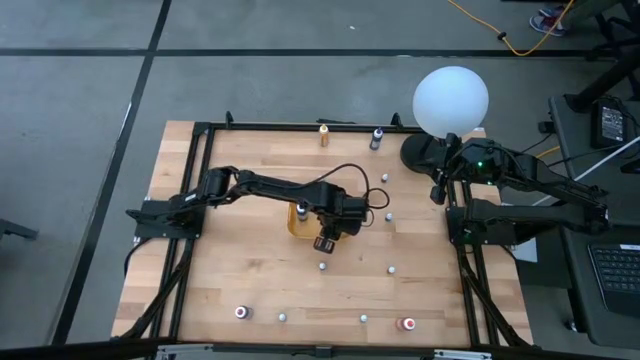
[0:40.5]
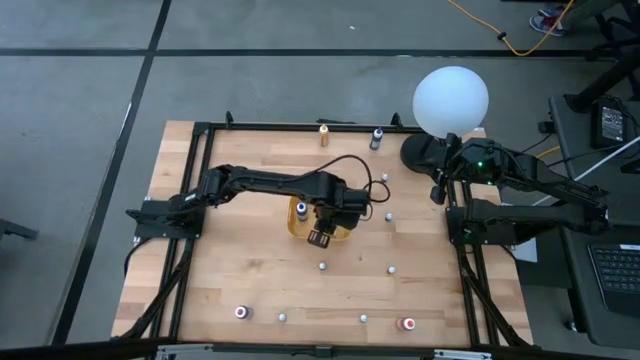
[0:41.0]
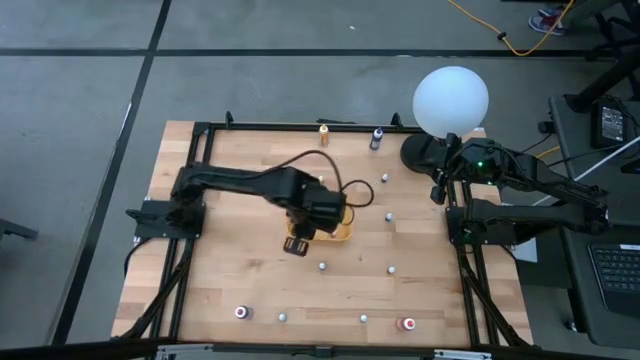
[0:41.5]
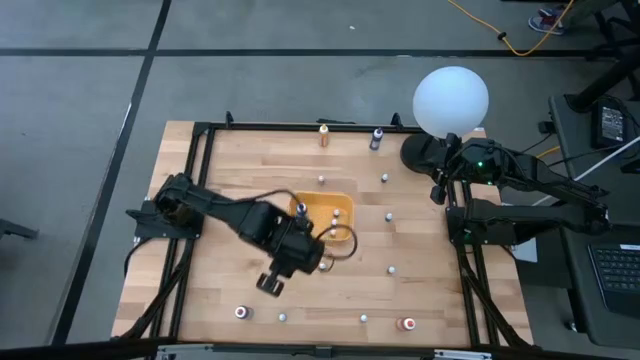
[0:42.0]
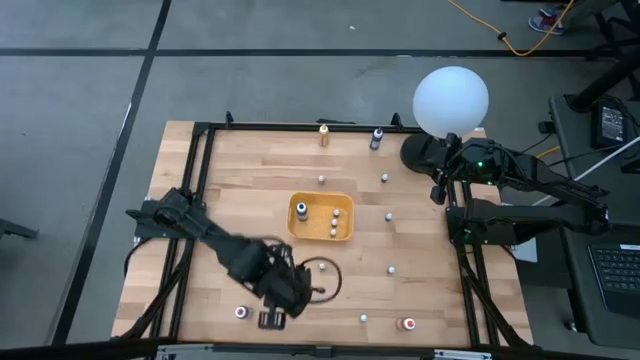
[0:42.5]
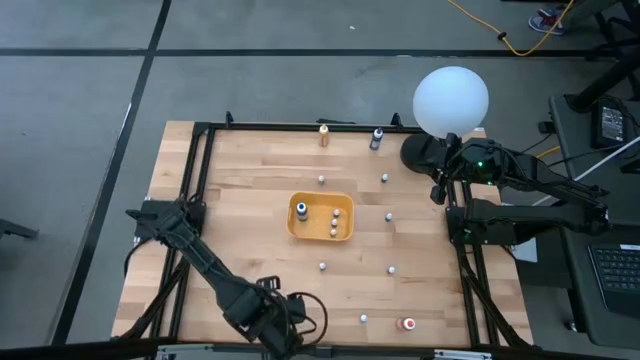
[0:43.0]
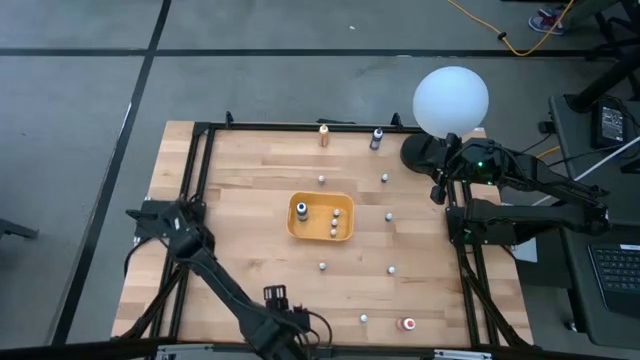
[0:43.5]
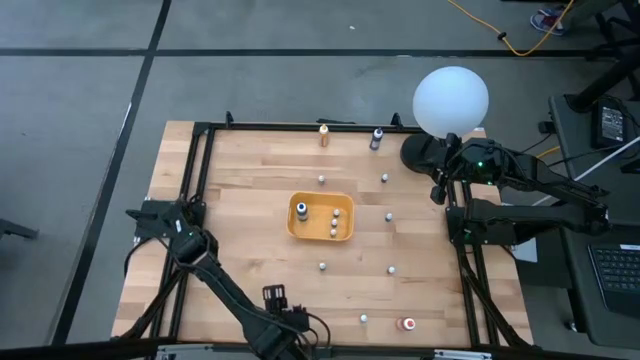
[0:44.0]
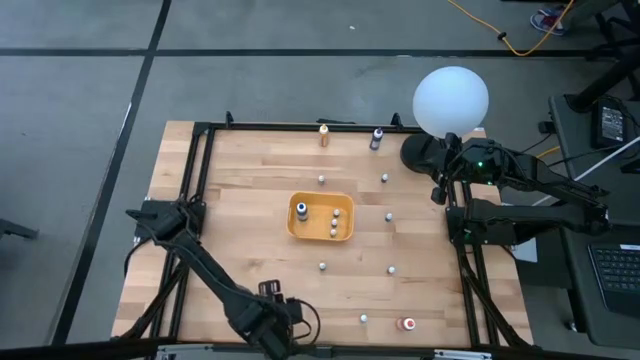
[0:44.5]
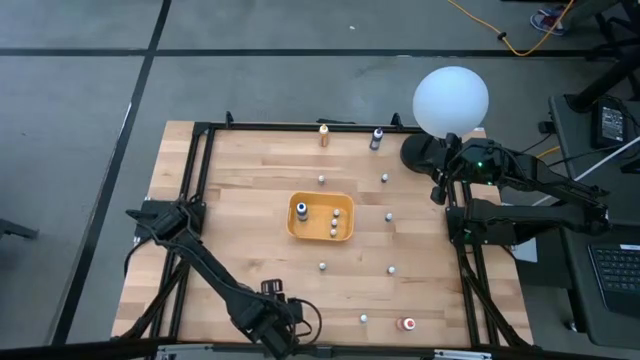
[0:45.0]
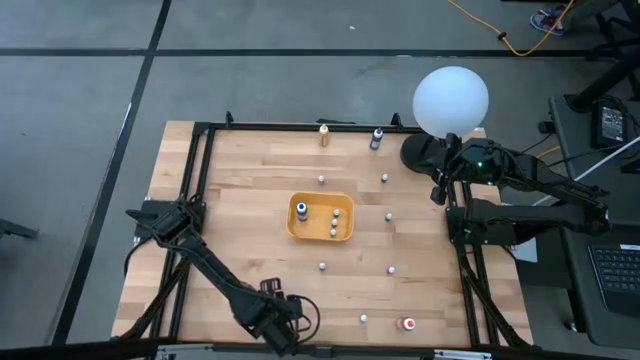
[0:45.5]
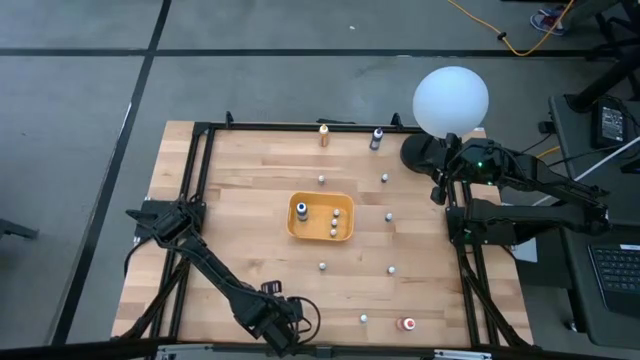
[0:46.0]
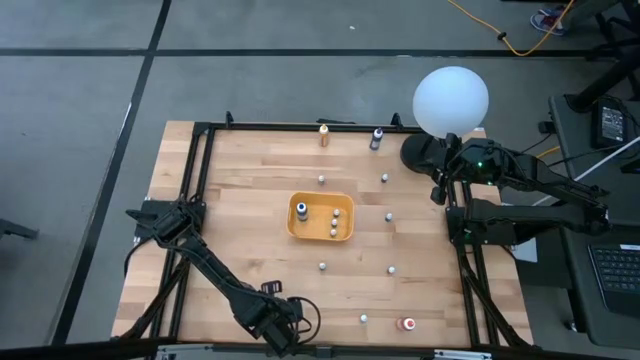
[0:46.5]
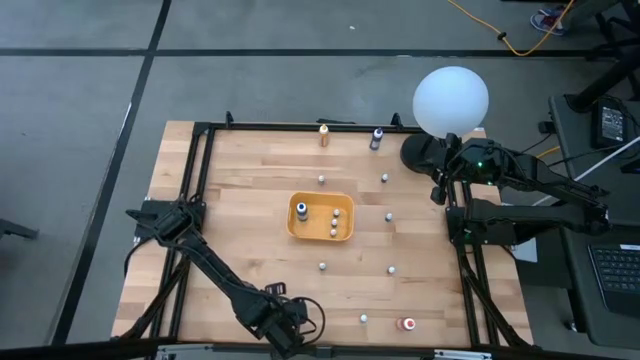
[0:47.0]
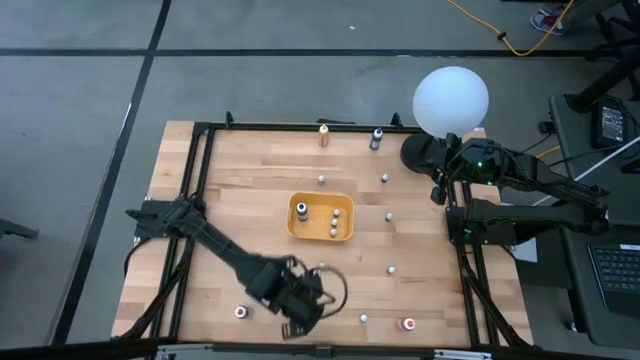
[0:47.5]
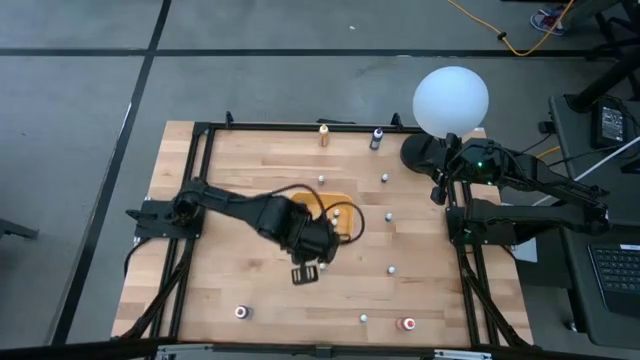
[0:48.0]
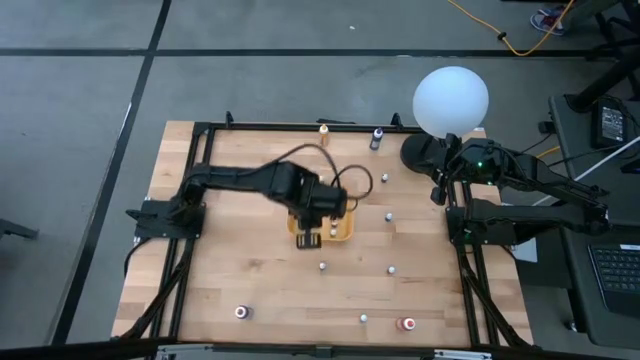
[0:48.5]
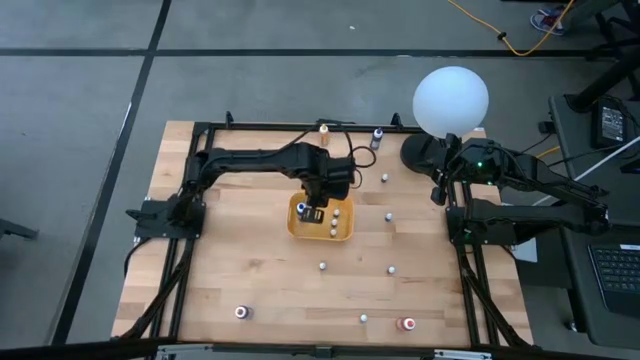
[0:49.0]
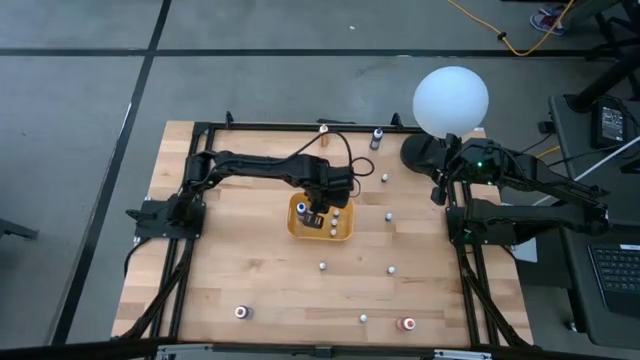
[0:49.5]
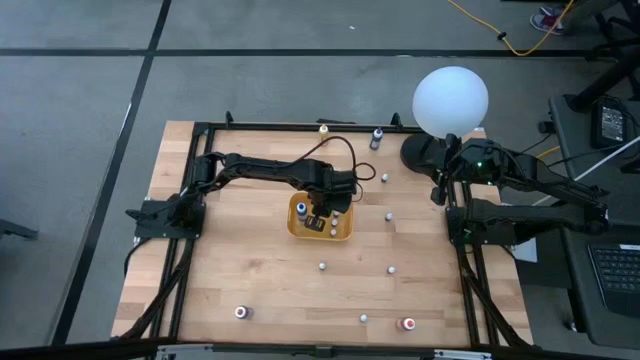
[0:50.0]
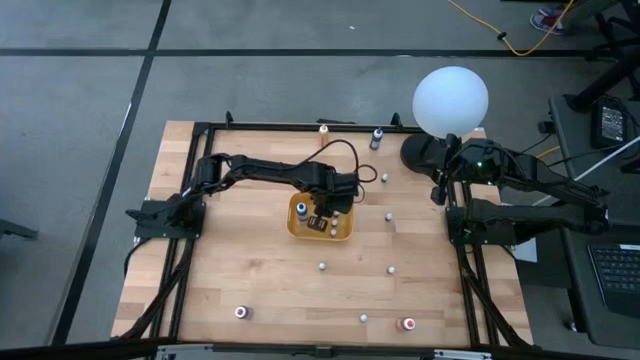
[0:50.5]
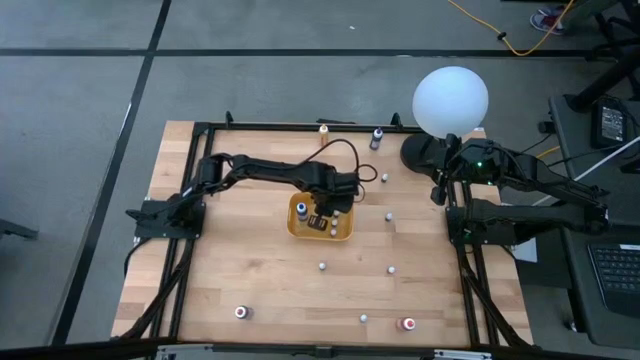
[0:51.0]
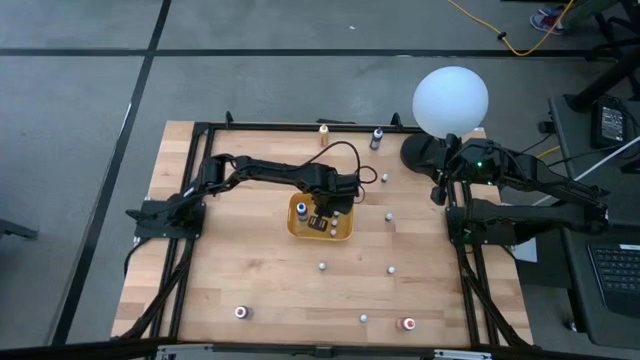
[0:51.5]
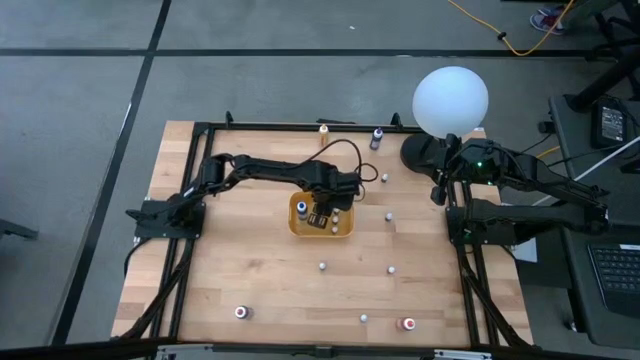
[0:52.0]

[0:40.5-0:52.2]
Task: Pick & Place food coloring
Put the black food coloring bottle into the yellow bin

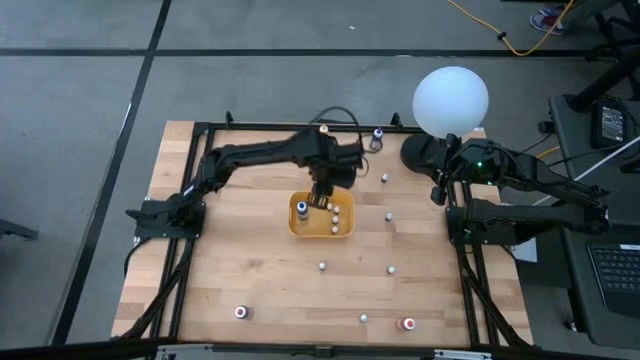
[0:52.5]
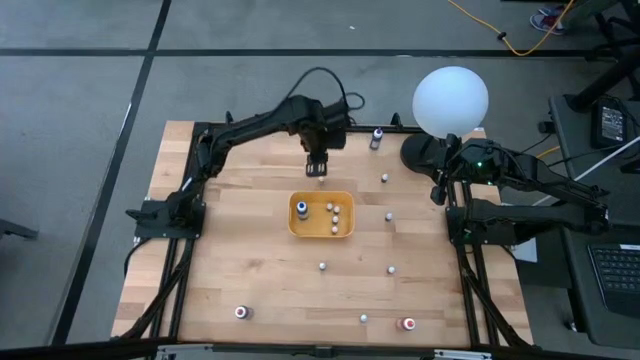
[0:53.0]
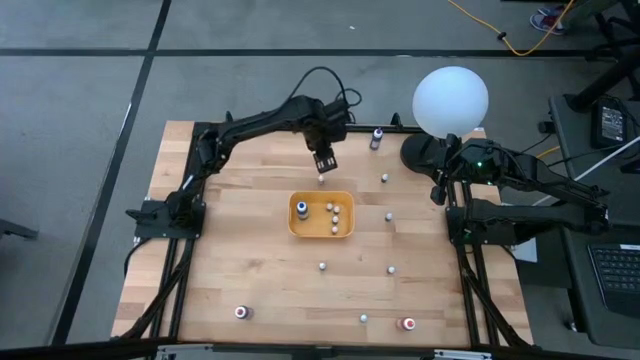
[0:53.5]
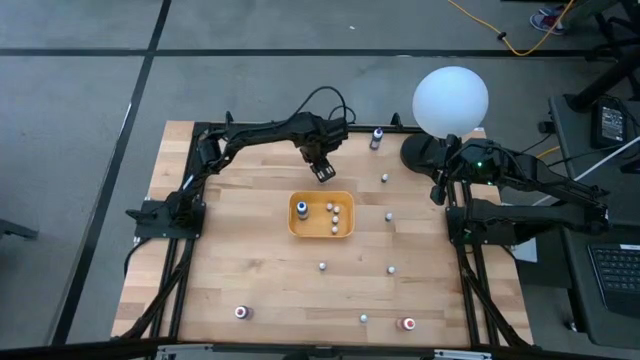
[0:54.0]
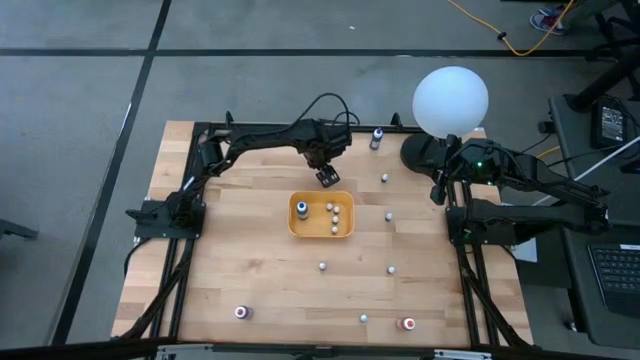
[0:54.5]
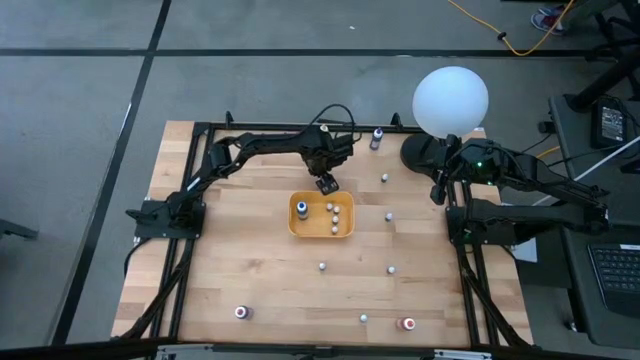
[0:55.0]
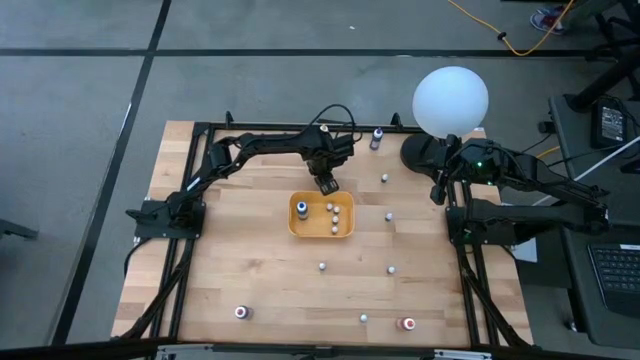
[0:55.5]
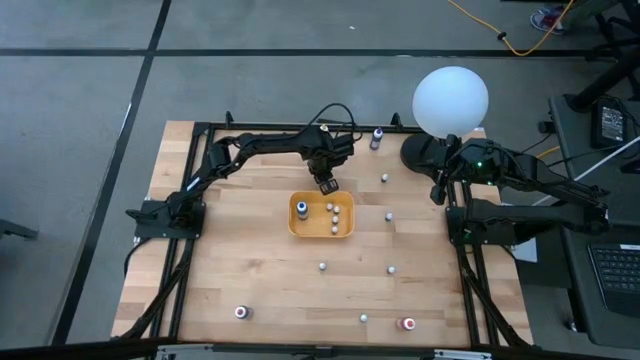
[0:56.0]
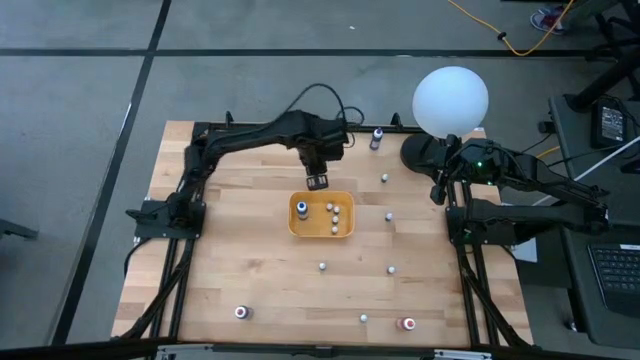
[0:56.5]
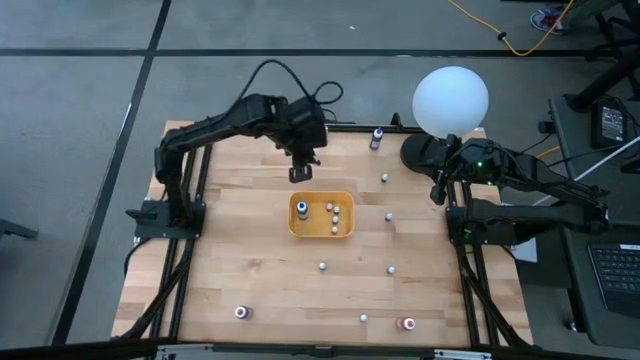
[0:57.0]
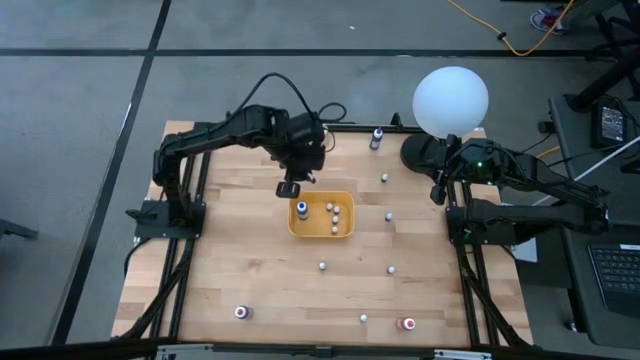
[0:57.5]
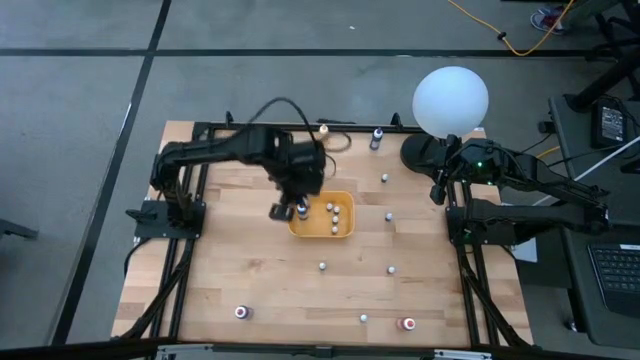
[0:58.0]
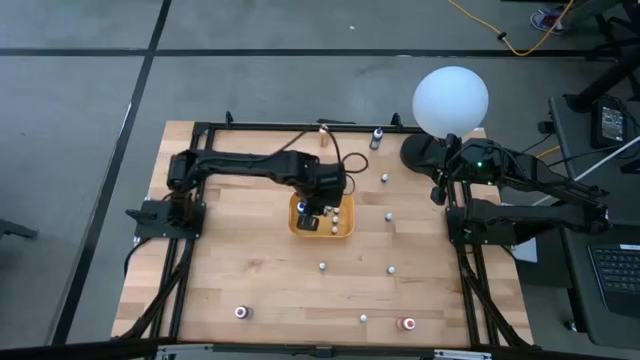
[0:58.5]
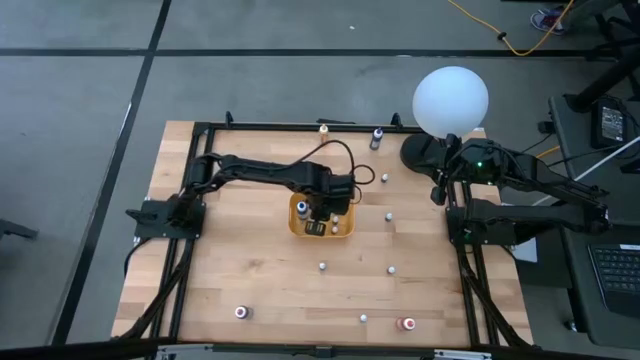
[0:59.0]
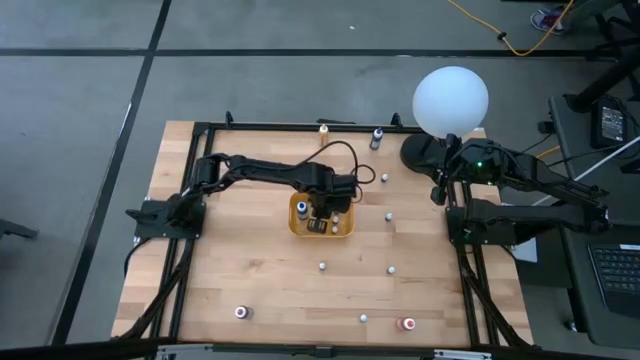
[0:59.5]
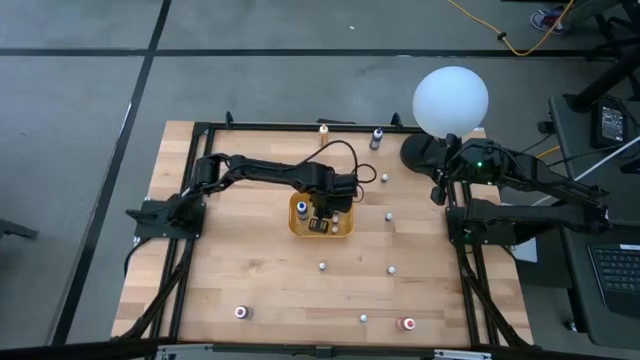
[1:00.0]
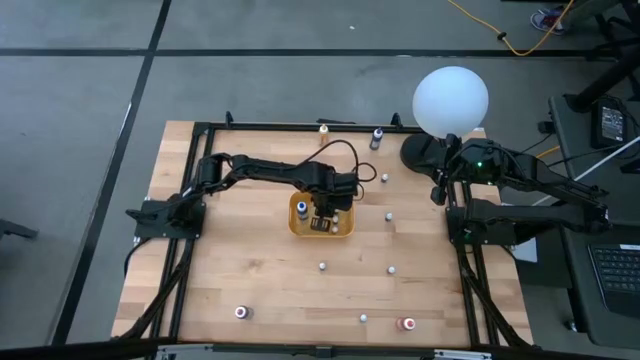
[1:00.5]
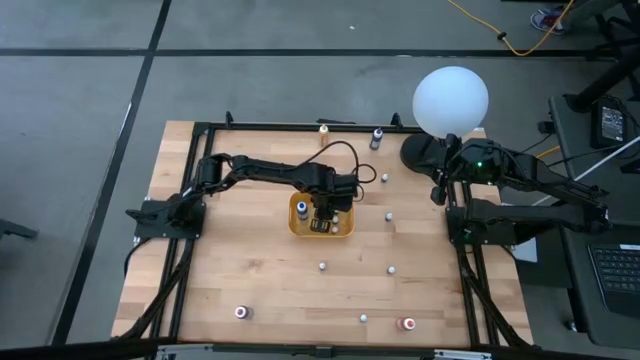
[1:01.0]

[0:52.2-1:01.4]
Put the black food coloring bottle into the yellow bin

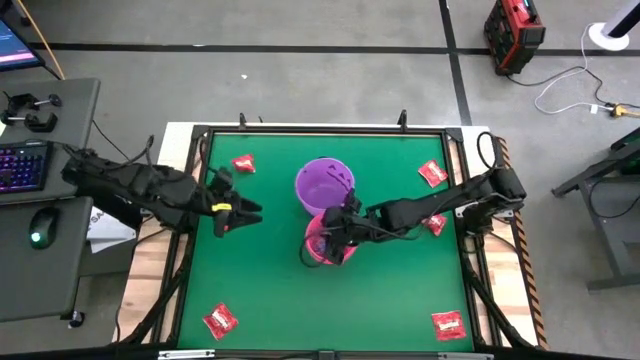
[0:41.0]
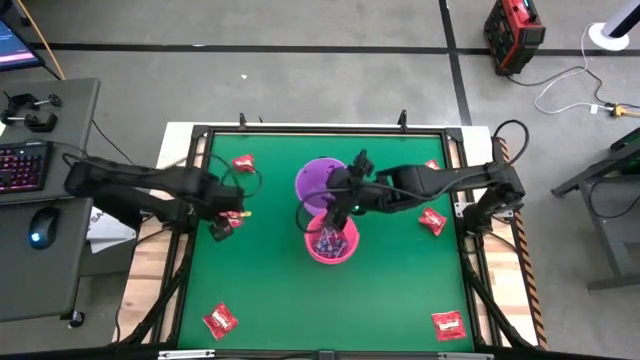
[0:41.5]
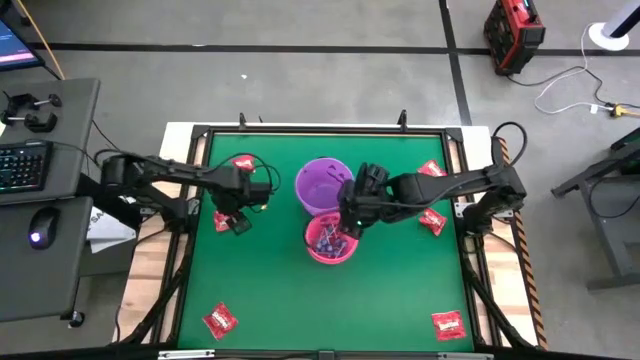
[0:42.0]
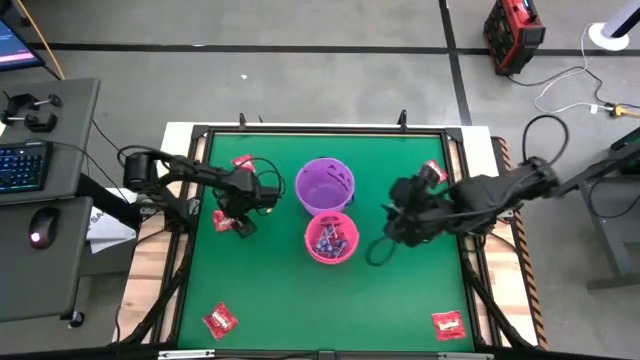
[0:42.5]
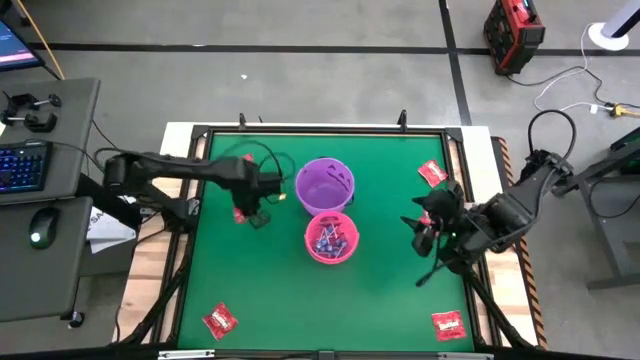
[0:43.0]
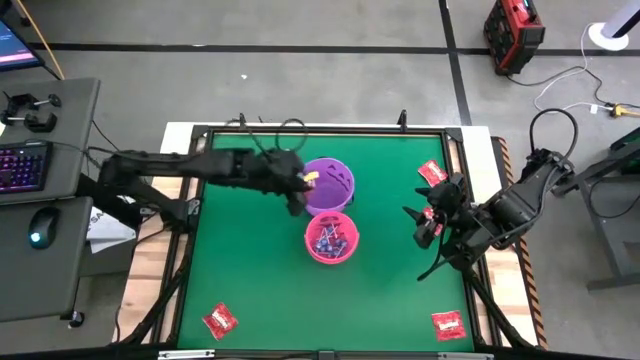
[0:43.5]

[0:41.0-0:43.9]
Task: Sort candy by brand, put in halloween buckets
Put the red candy into the purple bucket
